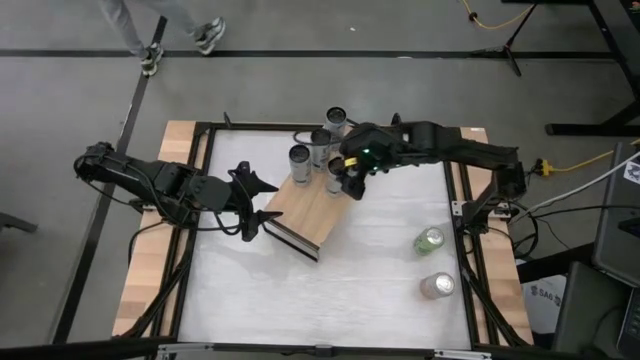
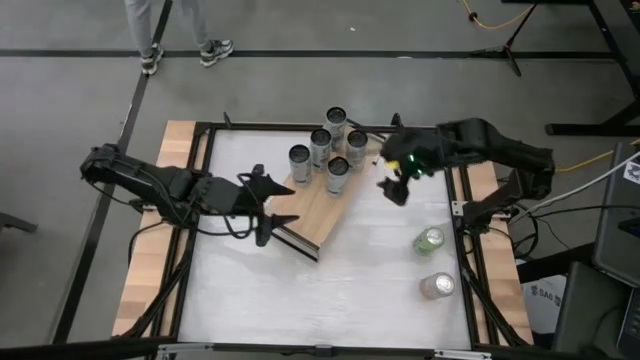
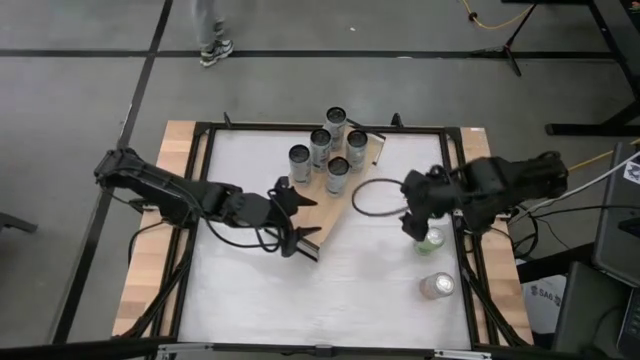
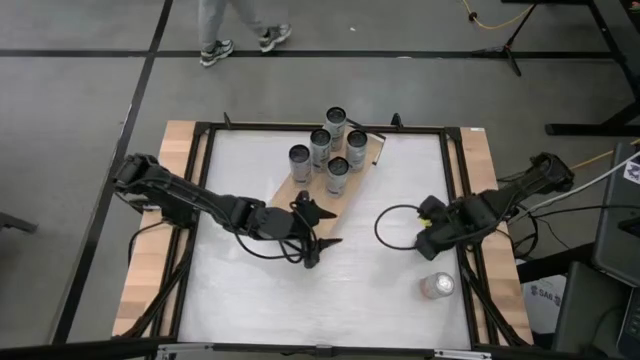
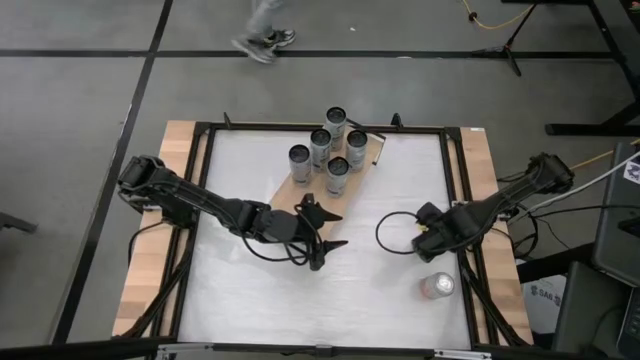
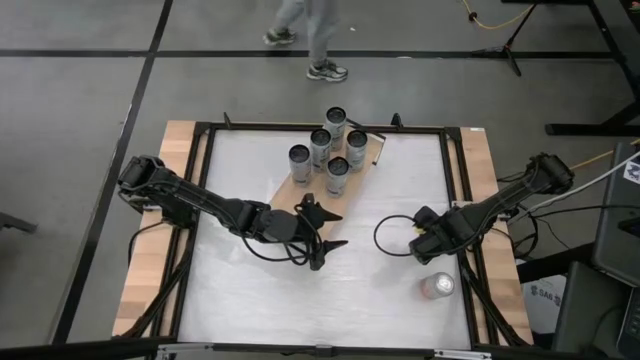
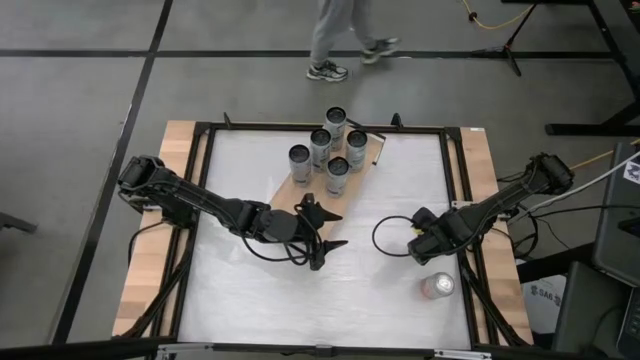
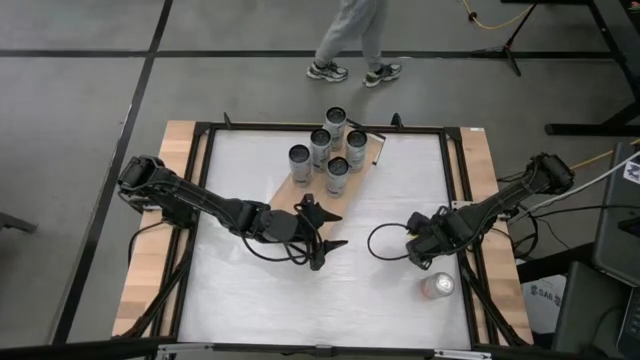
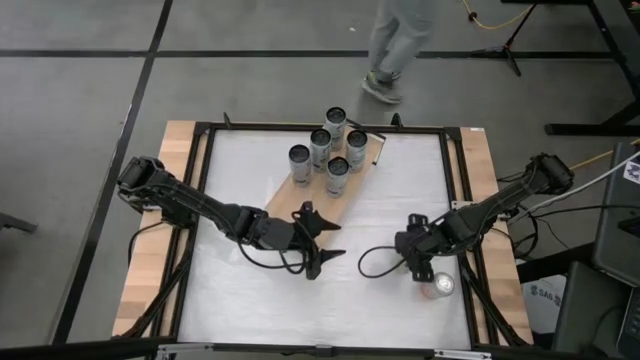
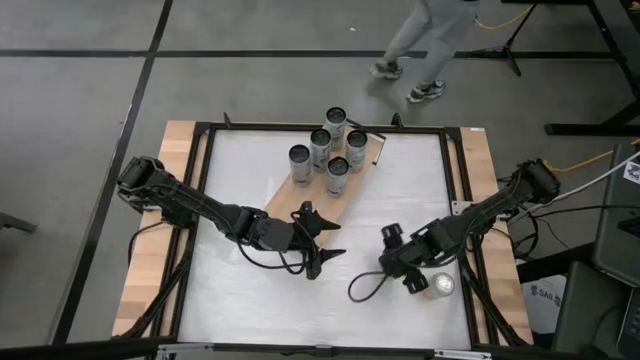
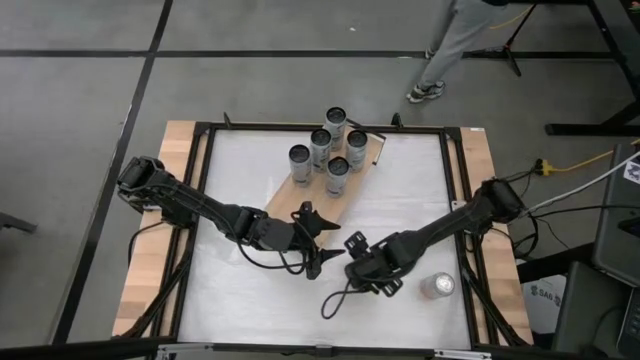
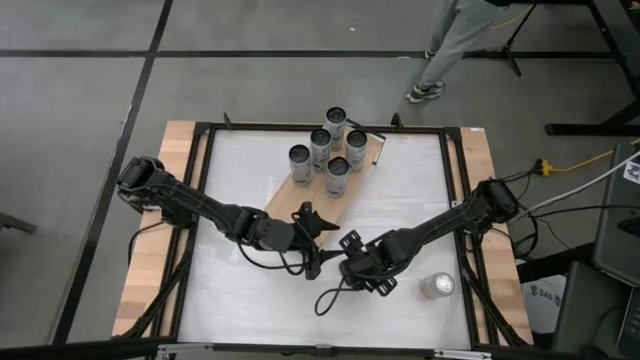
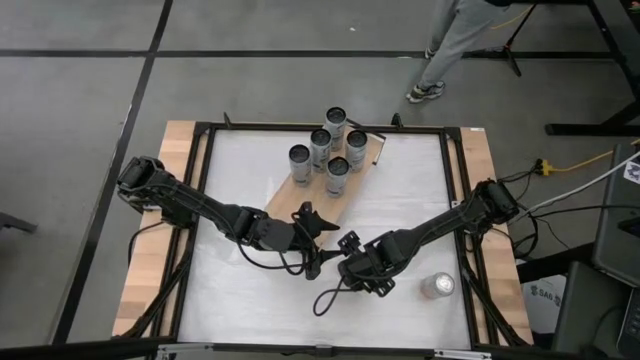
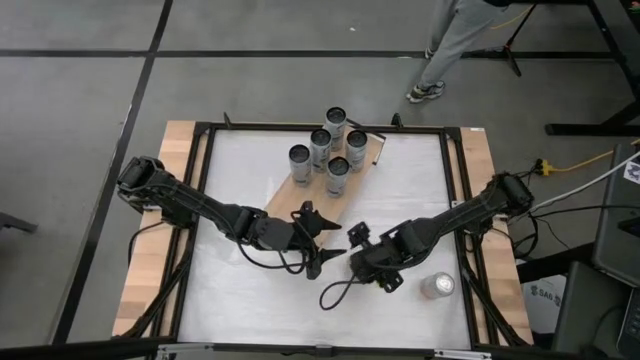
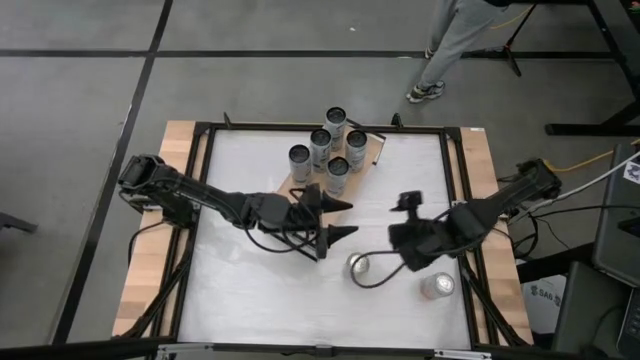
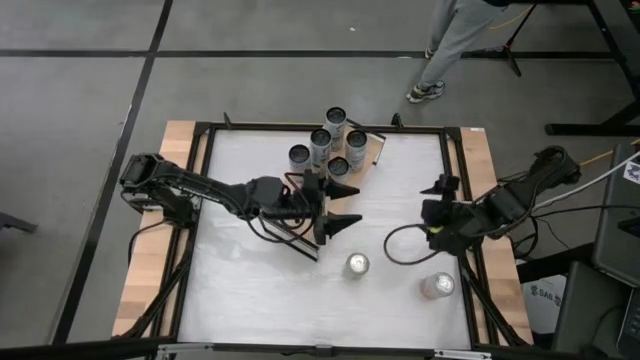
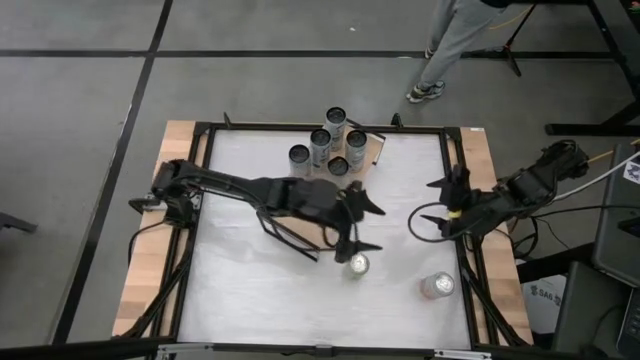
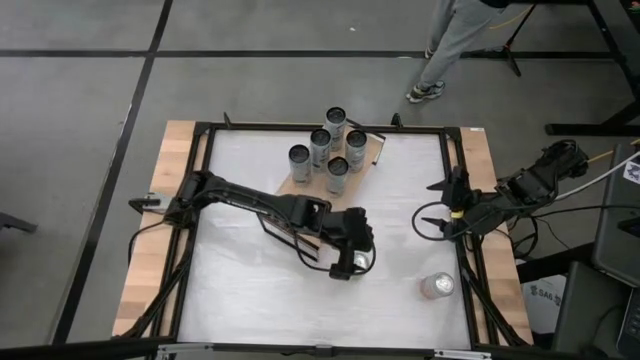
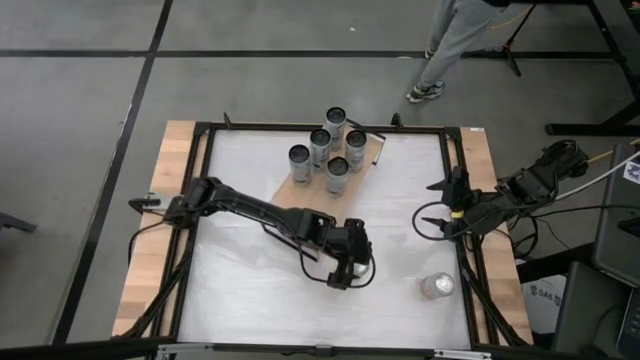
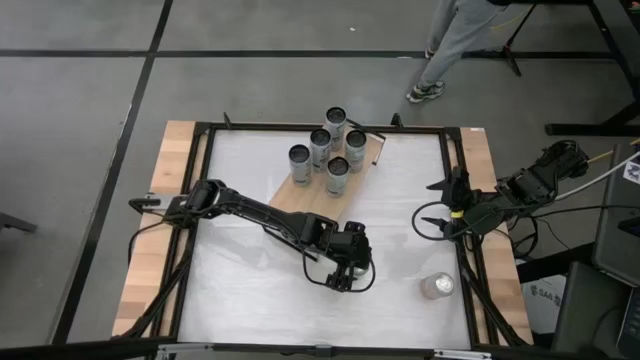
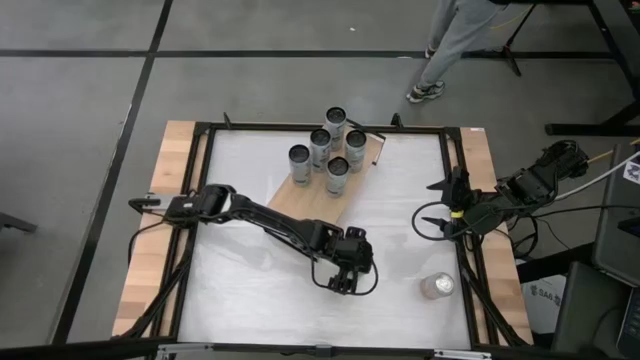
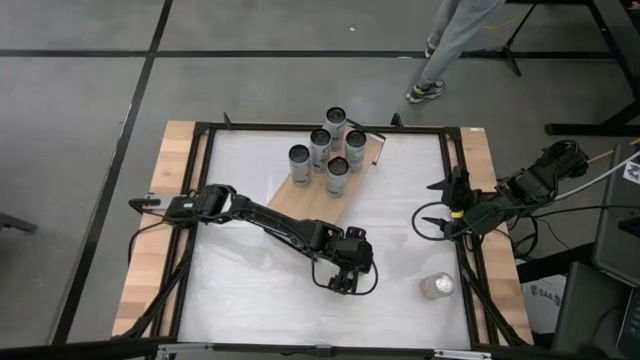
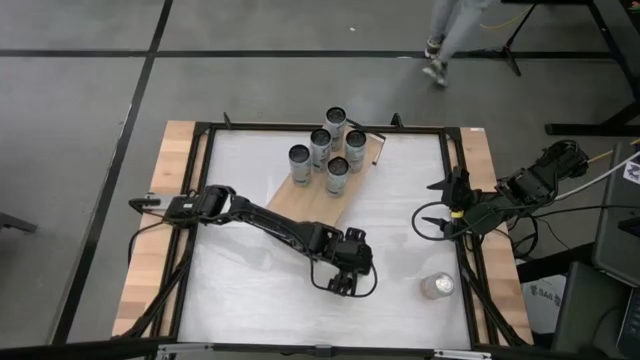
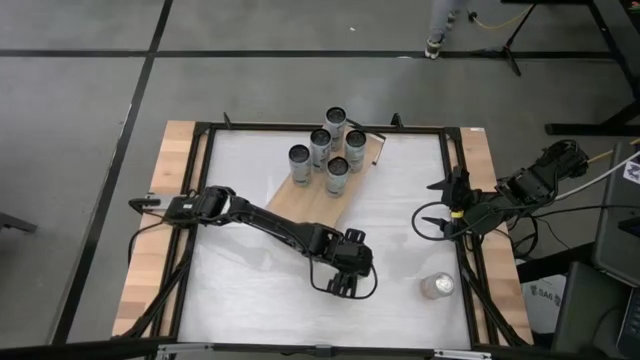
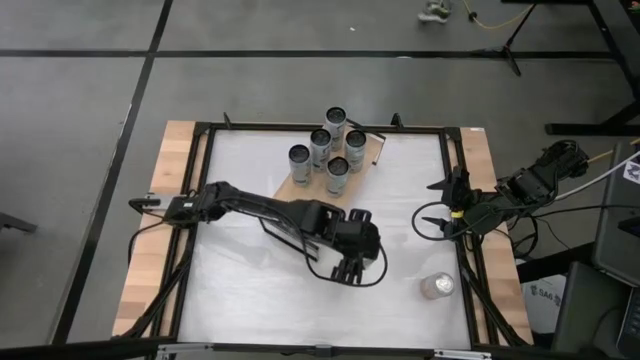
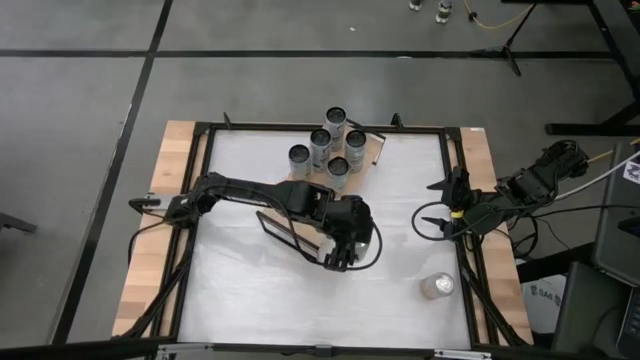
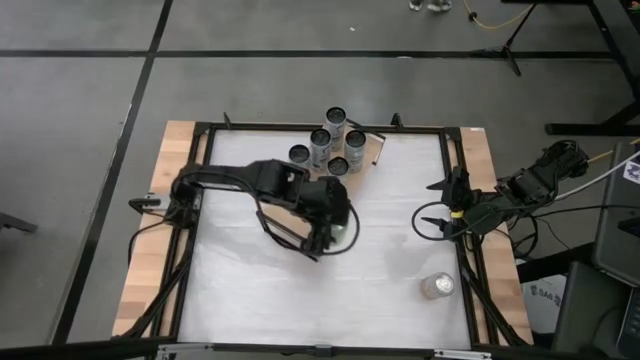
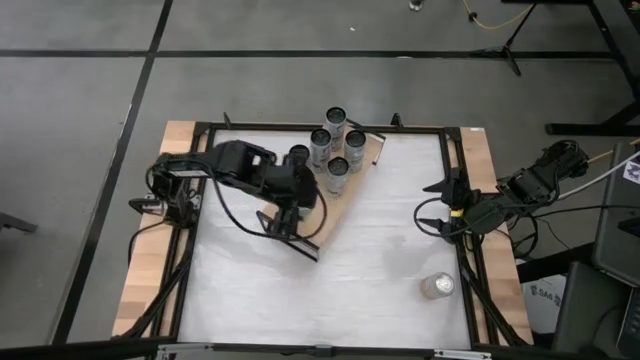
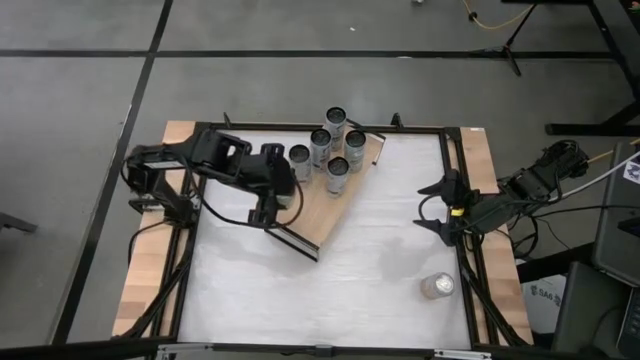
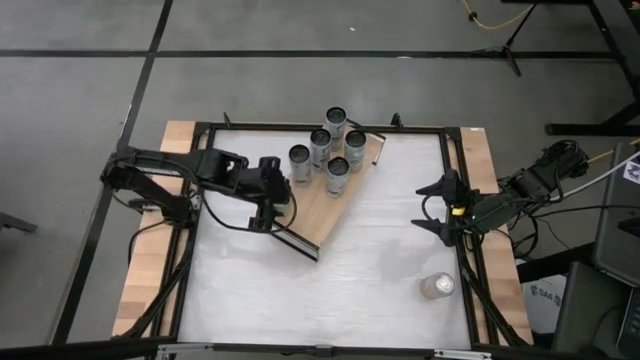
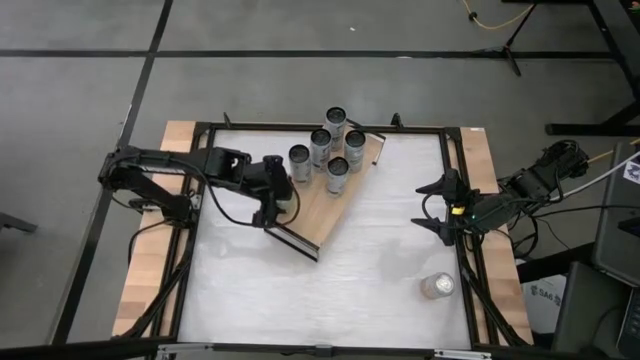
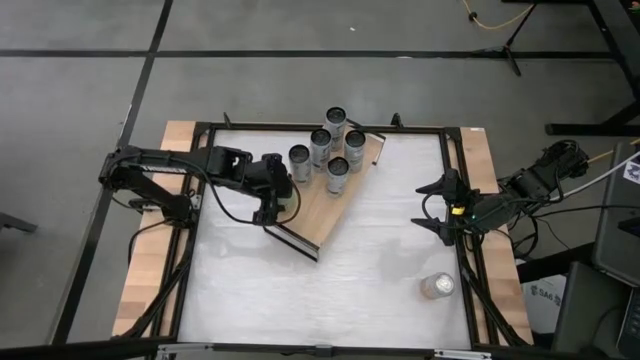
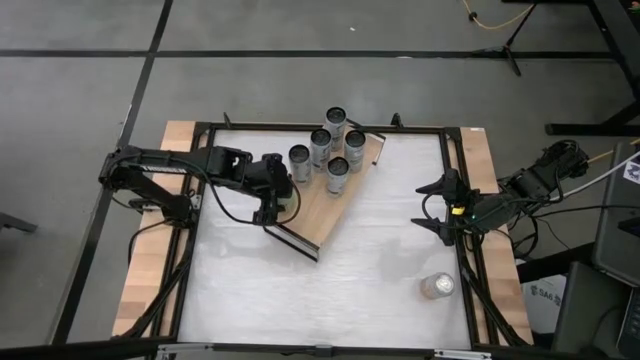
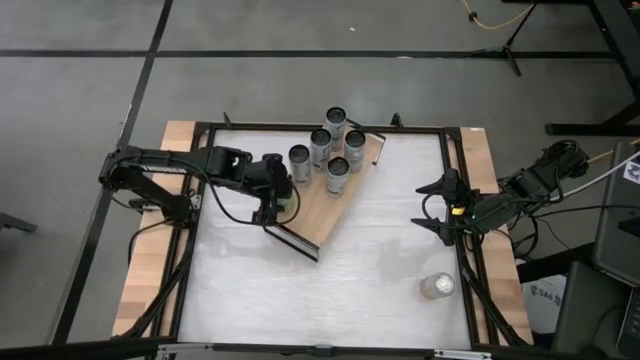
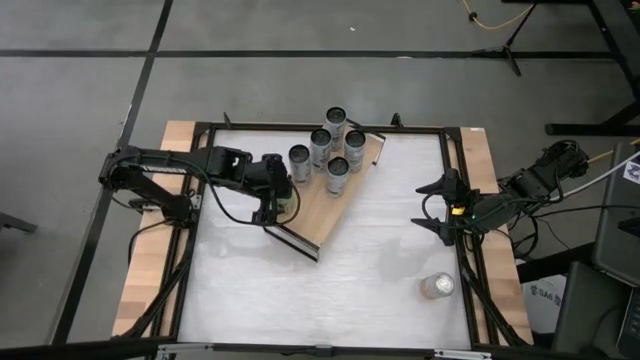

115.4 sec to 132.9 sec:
Task: Place canned beverage on shelf
Put the green soda can on the shelf
